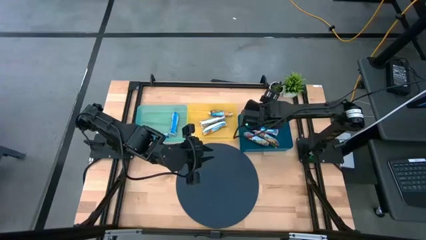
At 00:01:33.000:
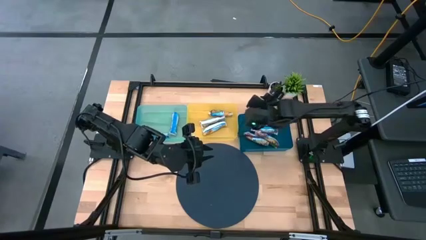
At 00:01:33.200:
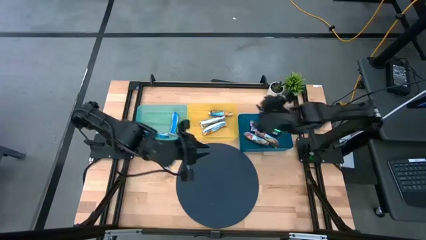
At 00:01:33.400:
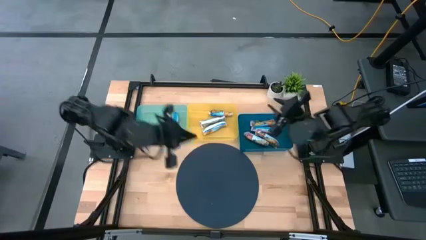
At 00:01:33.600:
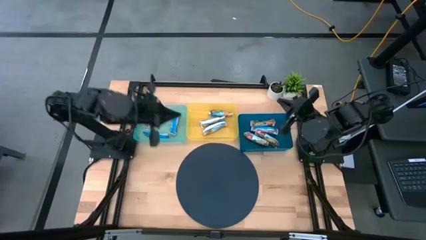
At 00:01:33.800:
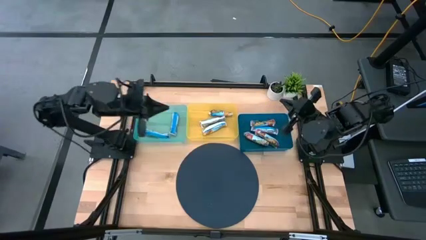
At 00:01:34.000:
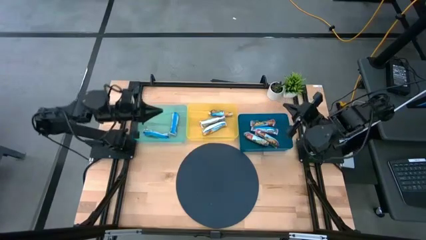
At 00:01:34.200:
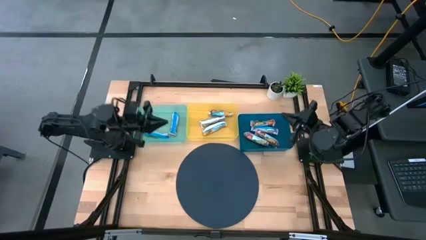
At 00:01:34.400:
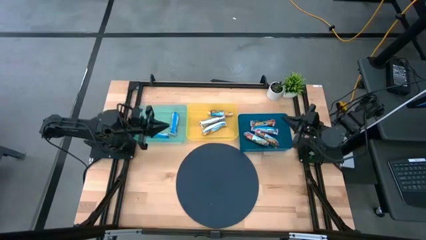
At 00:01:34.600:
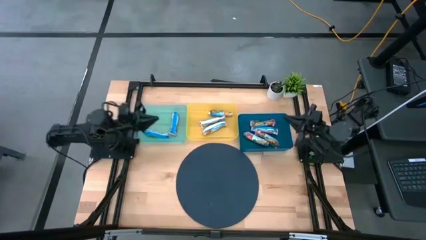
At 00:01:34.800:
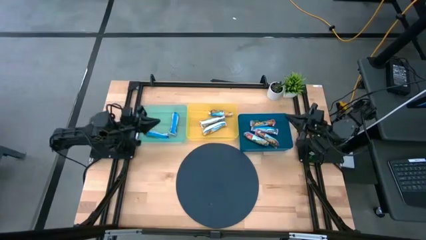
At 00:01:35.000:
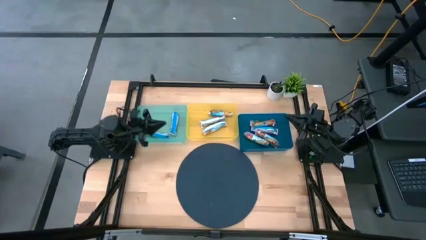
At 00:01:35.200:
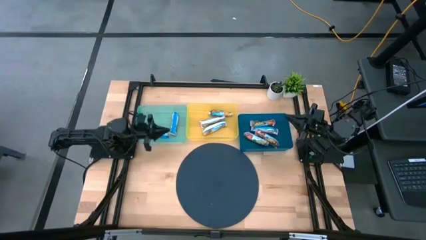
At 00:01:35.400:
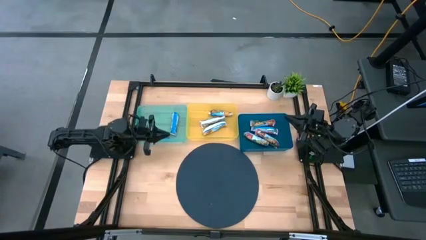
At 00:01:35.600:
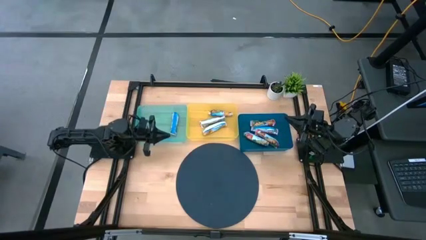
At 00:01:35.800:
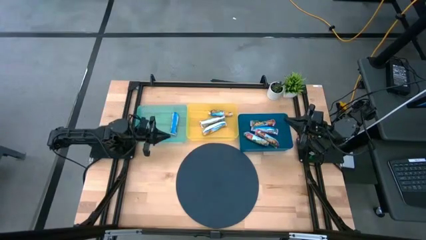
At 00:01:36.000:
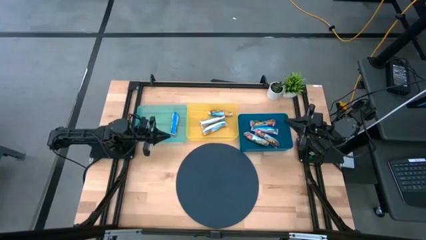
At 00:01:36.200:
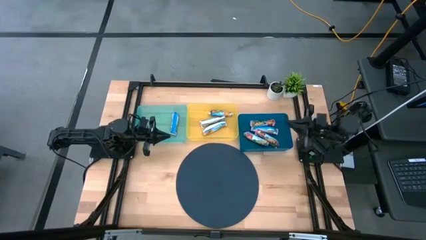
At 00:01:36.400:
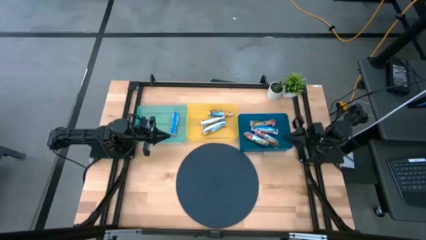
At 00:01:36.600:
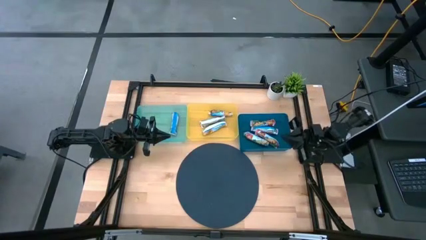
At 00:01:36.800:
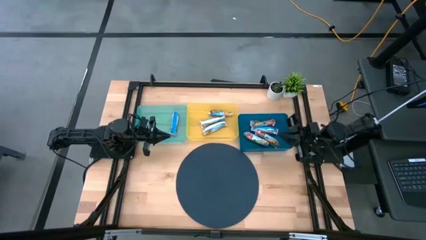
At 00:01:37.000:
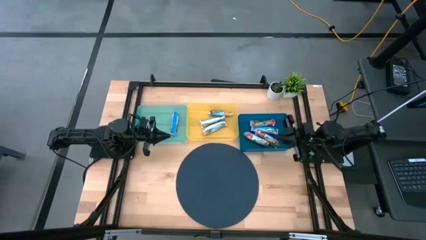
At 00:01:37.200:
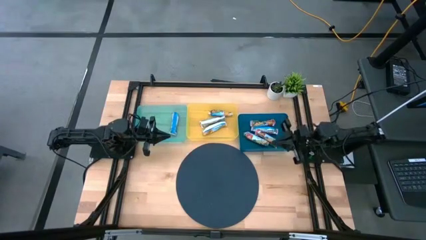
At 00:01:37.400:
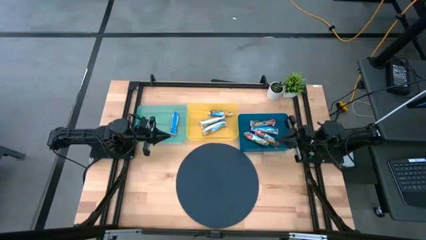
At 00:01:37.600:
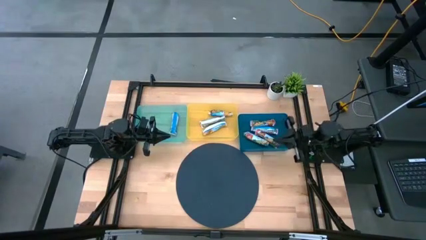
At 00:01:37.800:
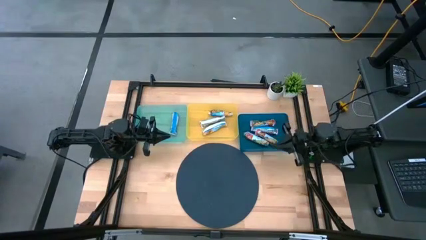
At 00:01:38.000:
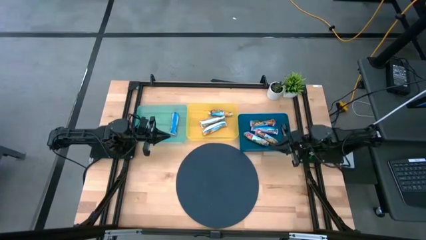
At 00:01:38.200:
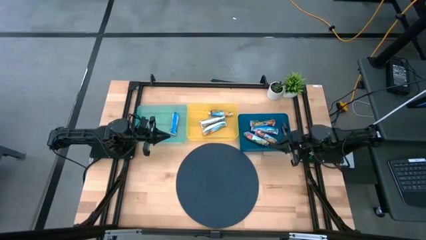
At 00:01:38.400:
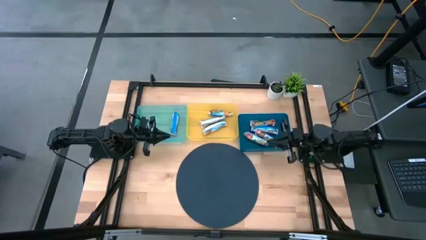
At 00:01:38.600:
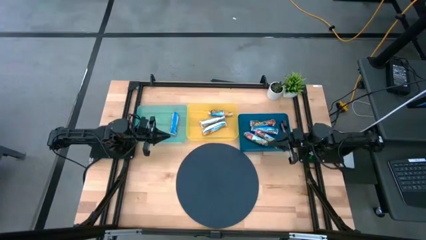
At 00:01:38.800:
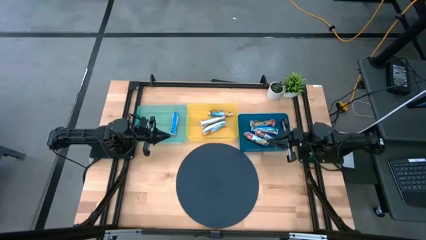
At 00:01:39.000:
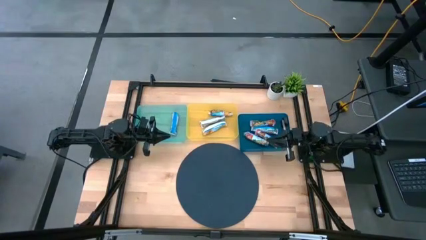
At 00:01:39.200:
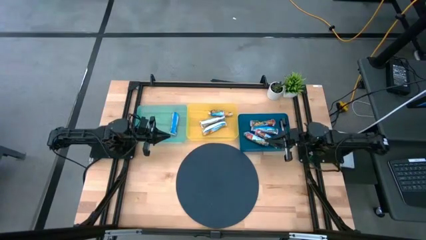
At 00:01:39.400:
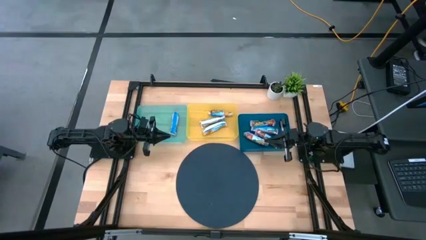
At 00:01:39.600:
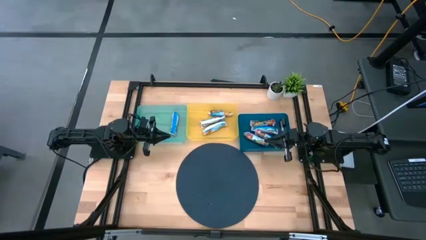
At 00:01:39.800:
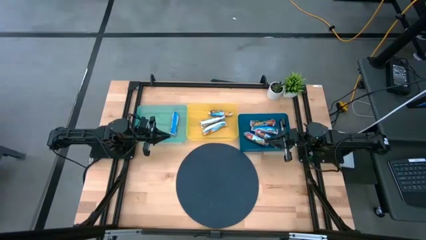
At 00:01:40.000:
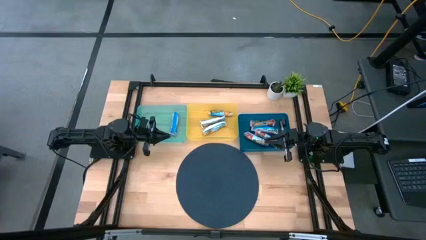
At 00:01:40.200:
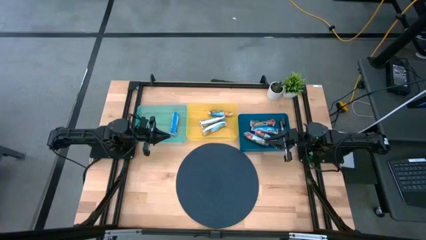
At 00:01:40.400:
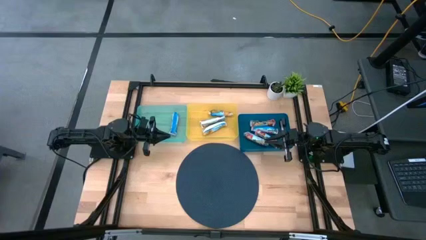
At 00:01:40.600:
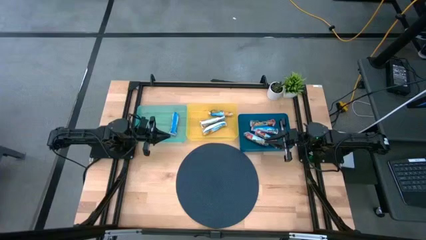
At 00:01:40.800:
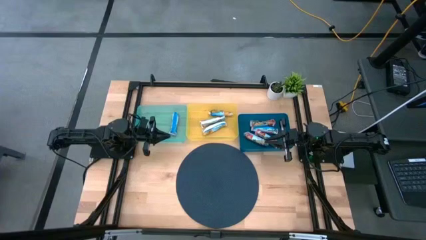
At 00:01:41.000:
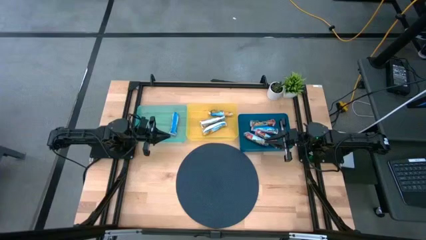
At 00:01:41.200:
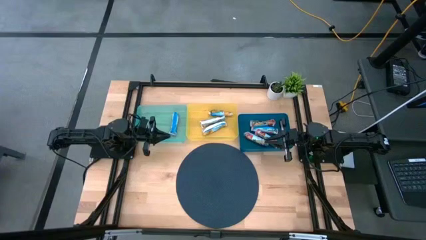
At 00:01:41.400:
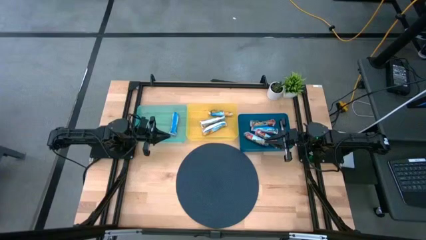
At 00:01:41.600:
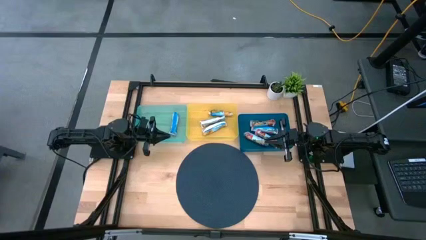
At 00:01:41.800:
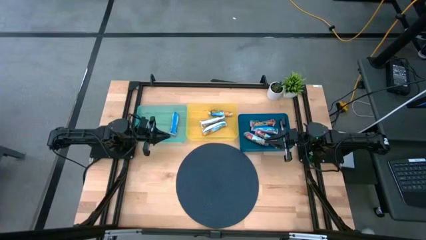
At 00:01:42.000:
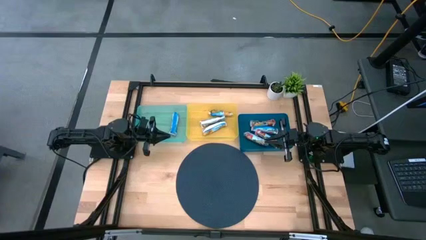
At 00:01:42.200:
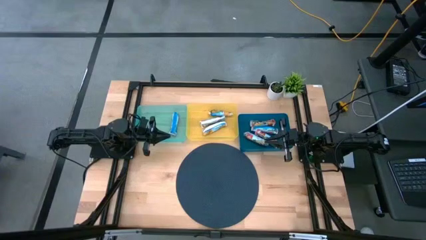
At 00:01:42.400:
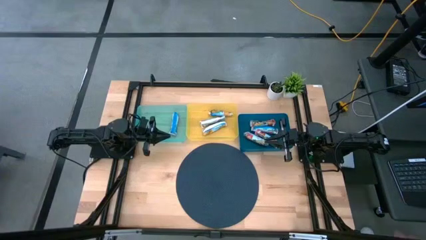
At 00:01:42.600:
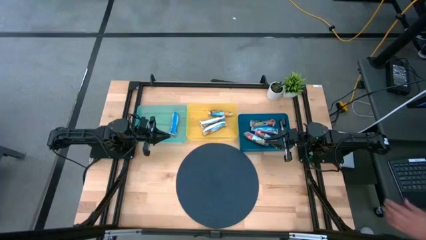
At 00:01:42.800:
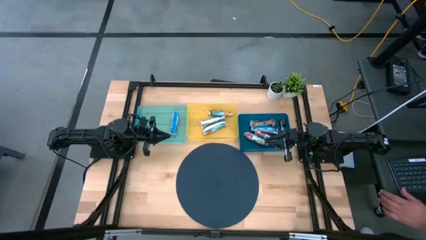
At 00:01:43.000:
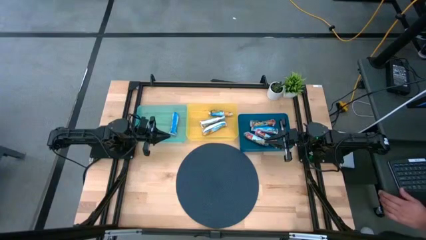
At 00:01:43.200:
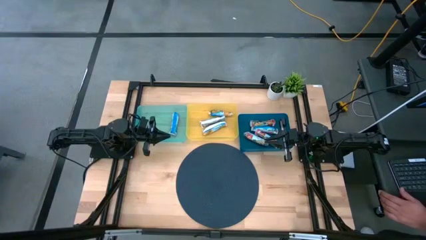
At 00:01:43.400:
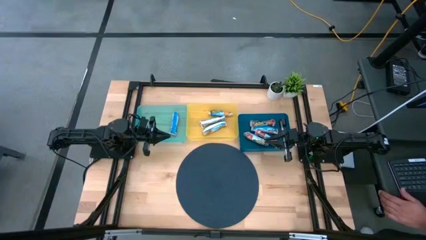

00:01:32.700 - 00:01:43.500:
Task: Pick and place Granola Bars by type
Return to Home Position
